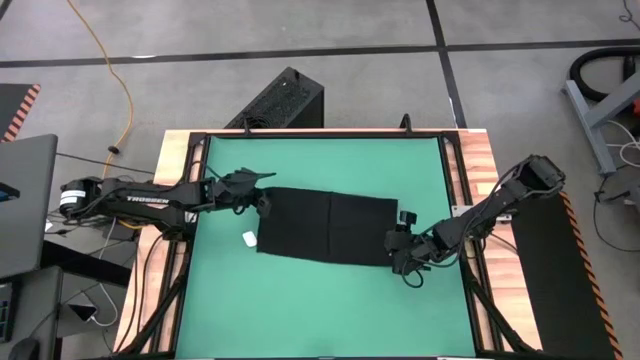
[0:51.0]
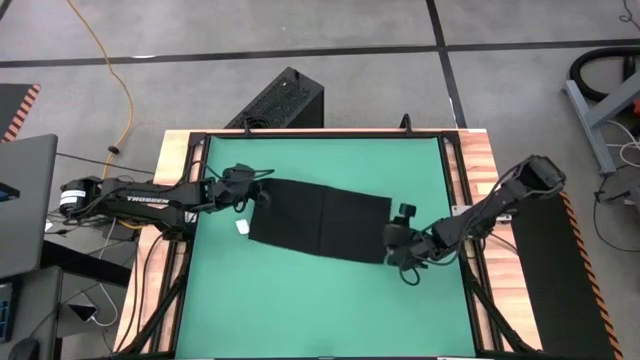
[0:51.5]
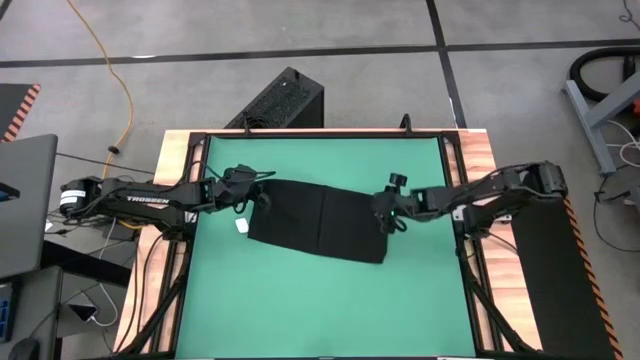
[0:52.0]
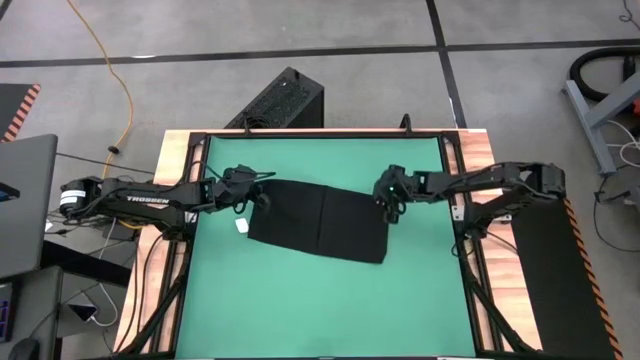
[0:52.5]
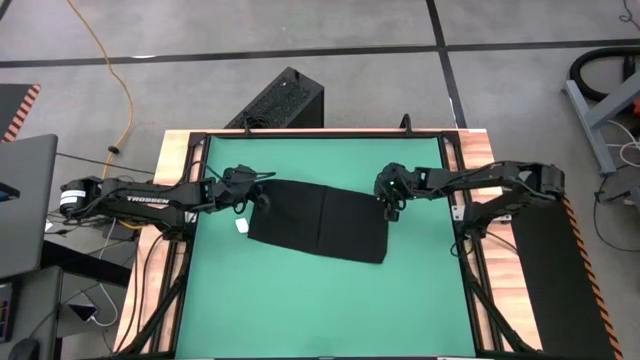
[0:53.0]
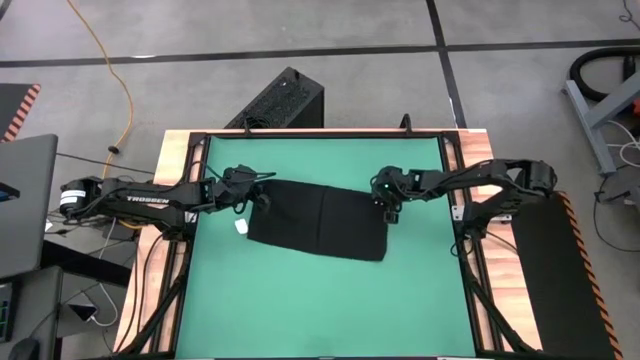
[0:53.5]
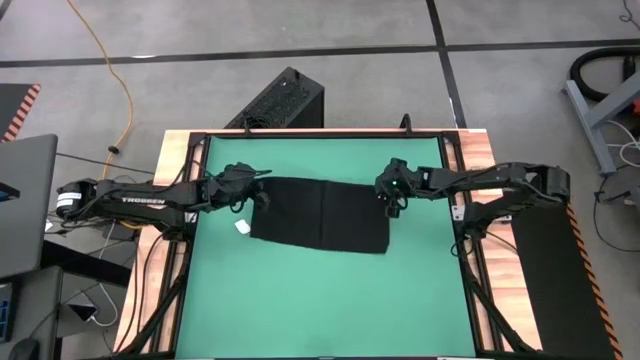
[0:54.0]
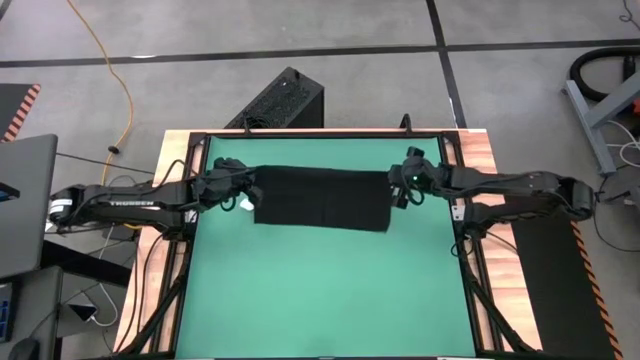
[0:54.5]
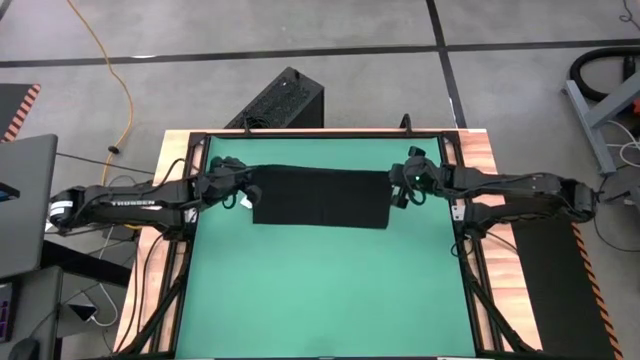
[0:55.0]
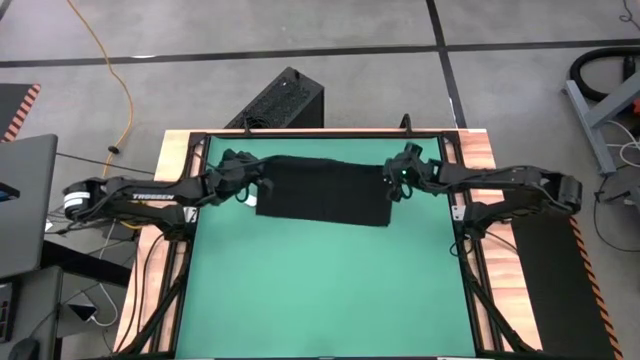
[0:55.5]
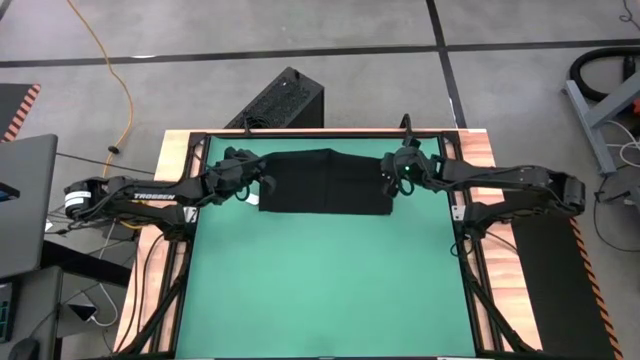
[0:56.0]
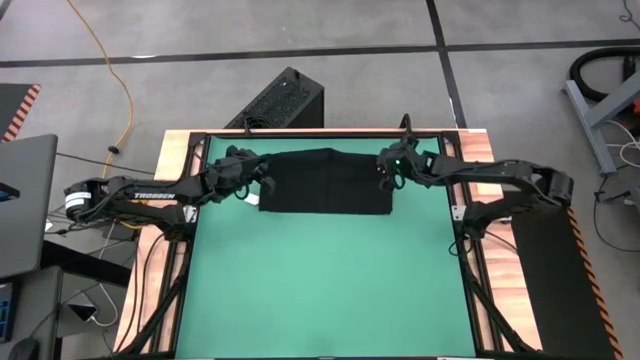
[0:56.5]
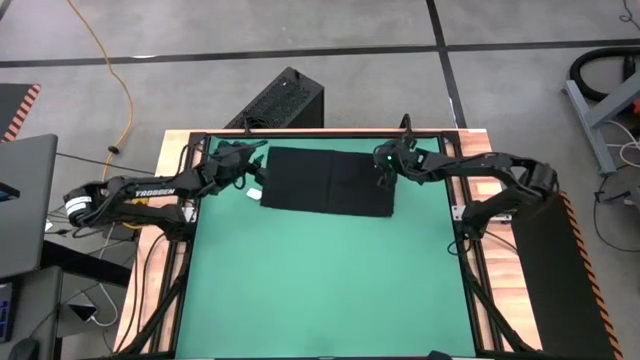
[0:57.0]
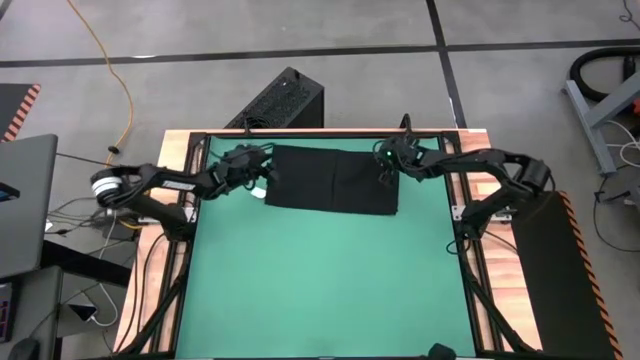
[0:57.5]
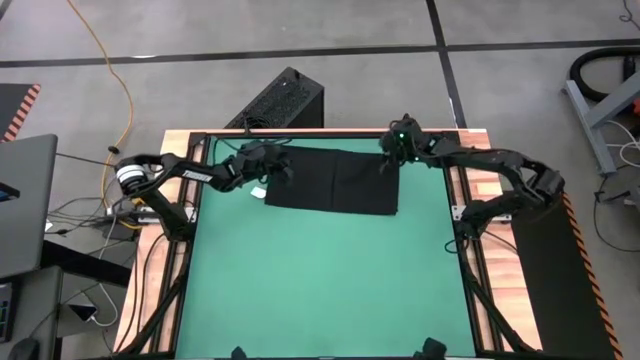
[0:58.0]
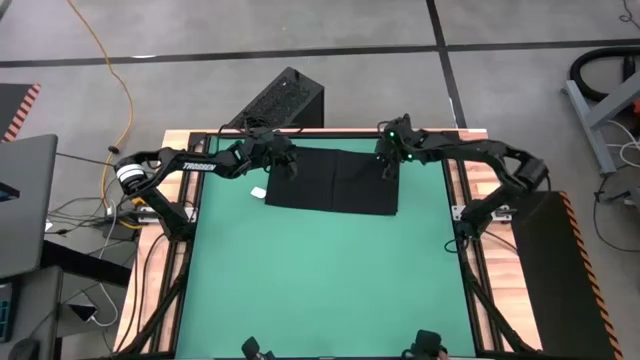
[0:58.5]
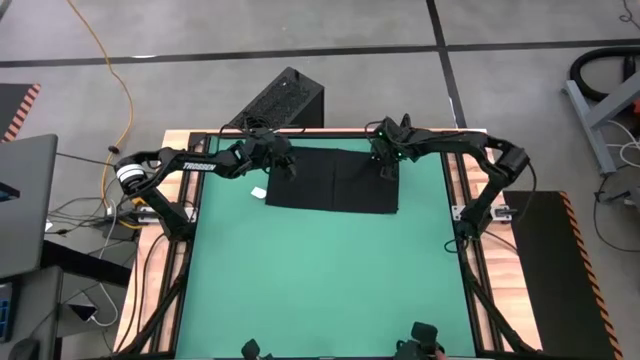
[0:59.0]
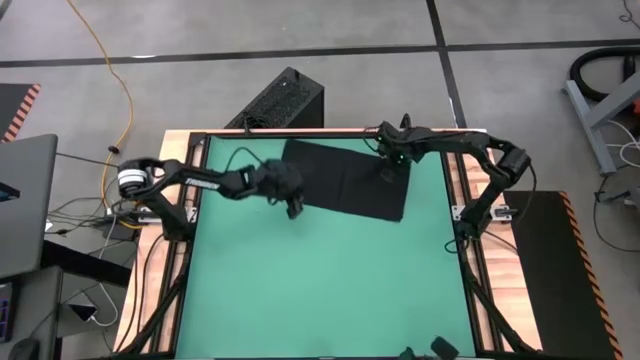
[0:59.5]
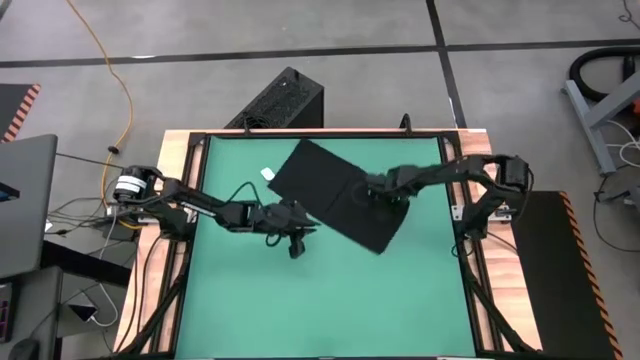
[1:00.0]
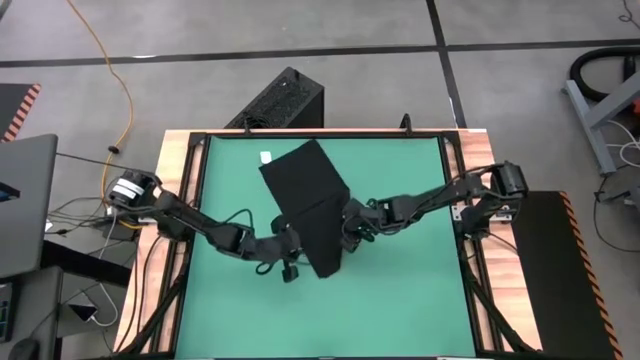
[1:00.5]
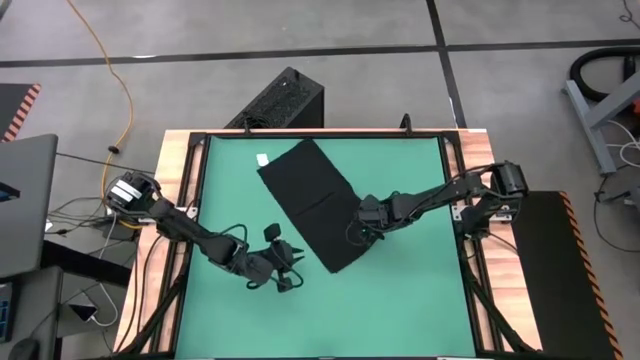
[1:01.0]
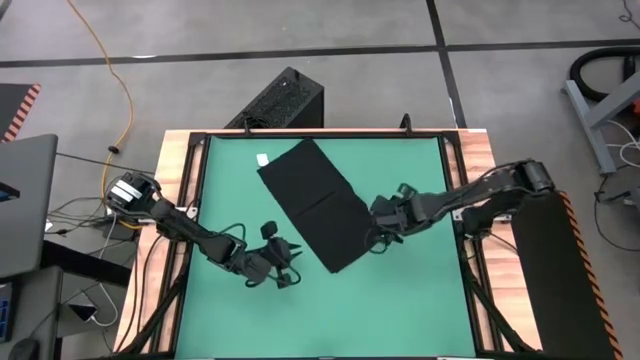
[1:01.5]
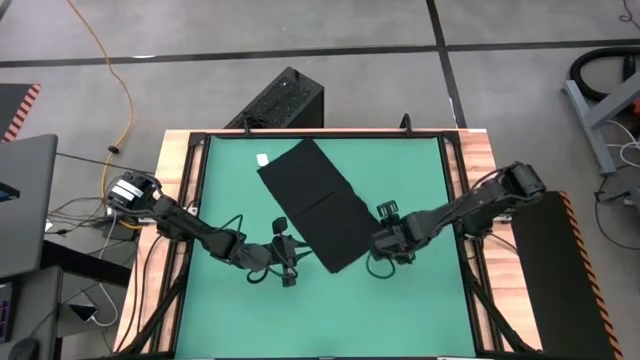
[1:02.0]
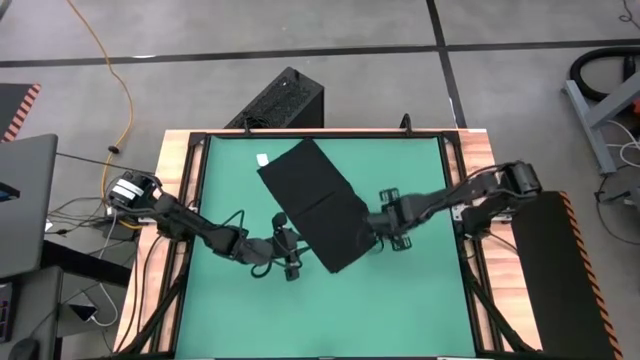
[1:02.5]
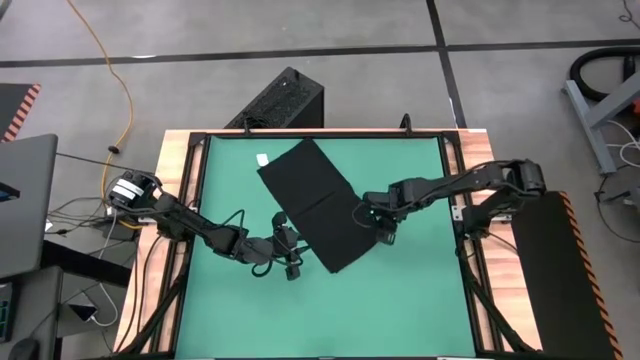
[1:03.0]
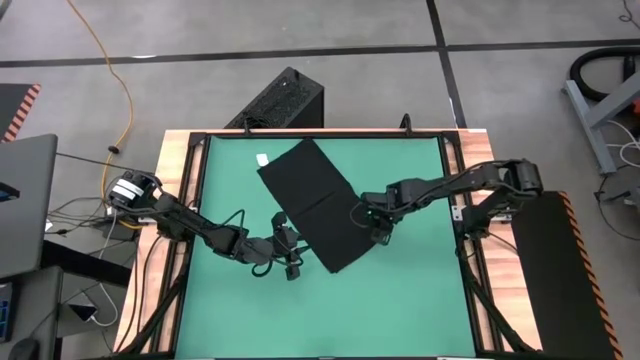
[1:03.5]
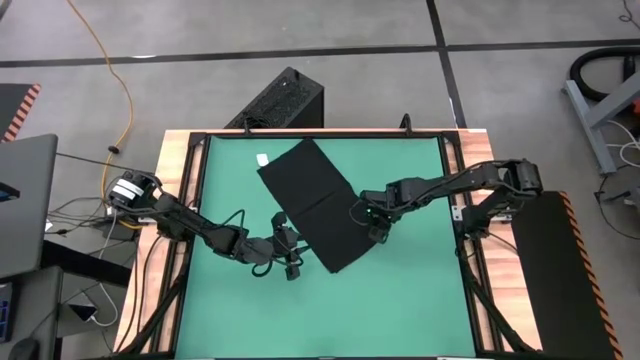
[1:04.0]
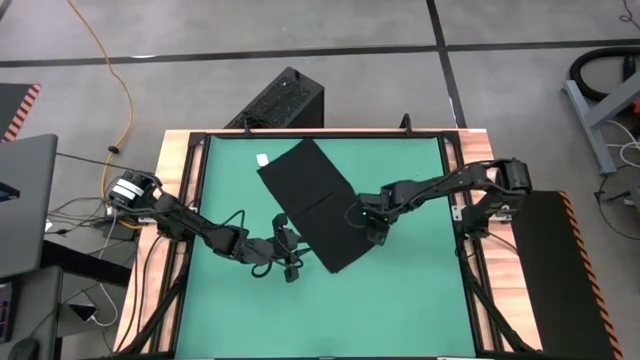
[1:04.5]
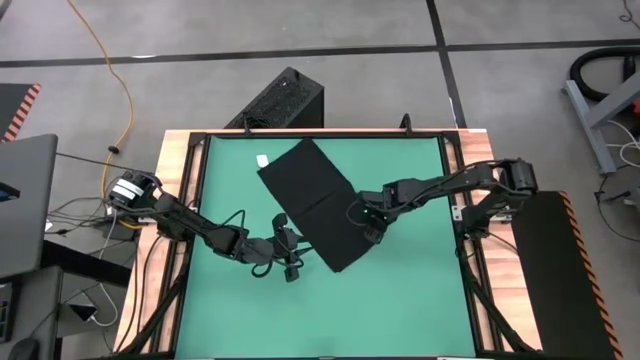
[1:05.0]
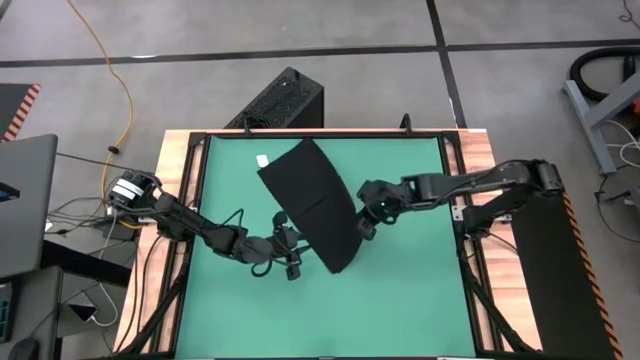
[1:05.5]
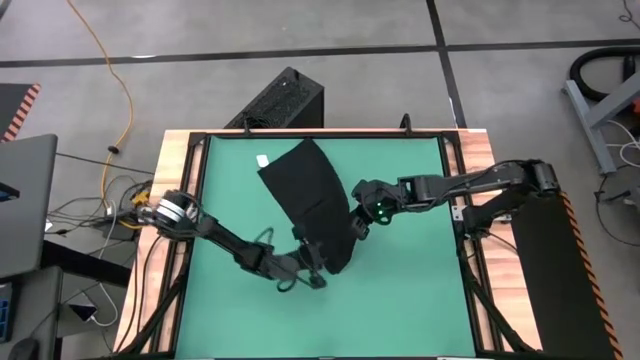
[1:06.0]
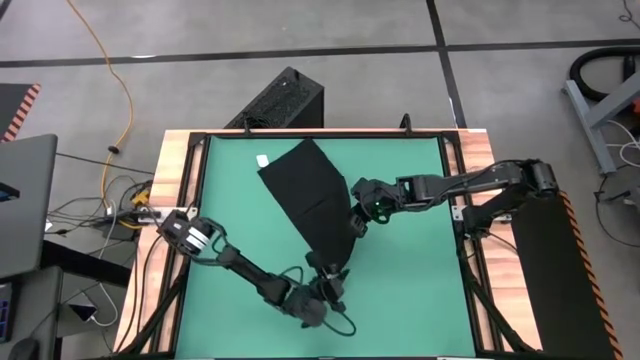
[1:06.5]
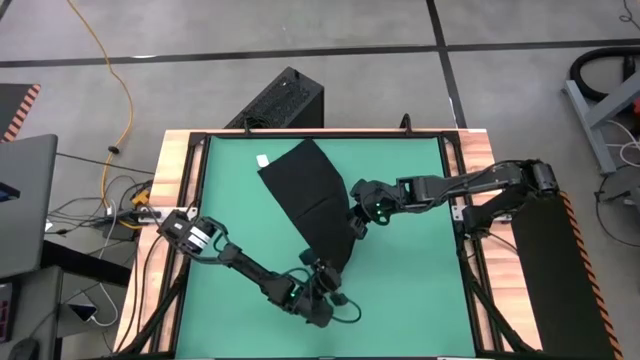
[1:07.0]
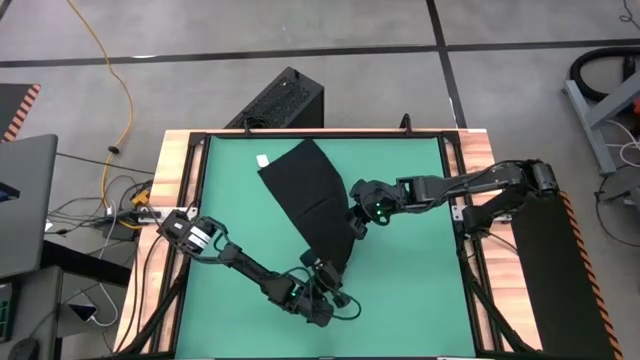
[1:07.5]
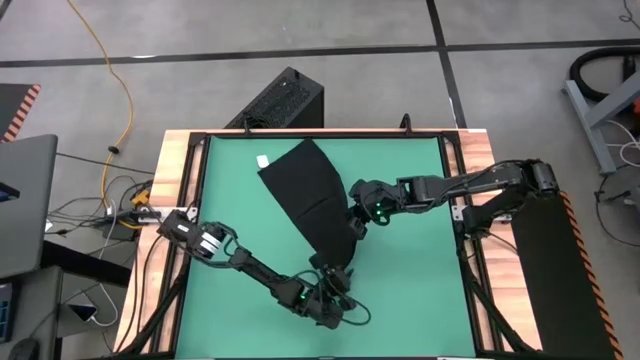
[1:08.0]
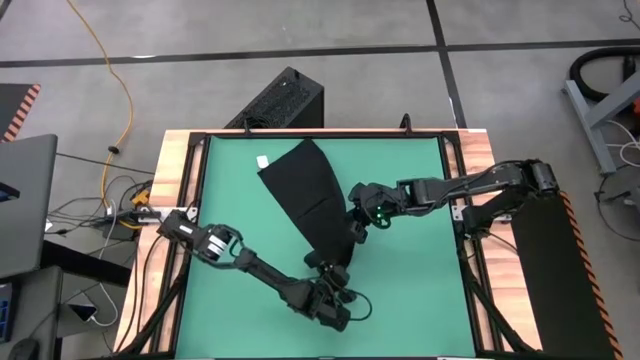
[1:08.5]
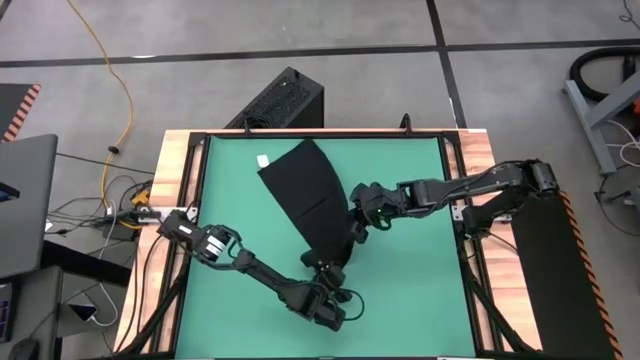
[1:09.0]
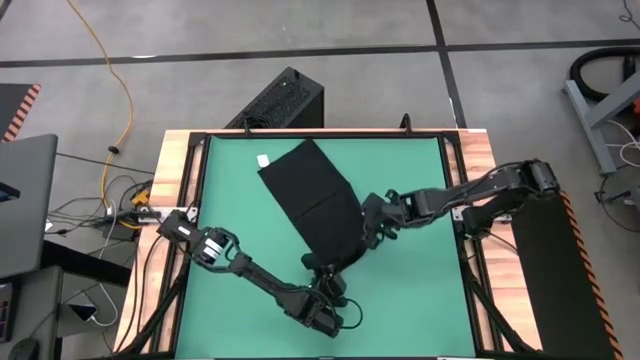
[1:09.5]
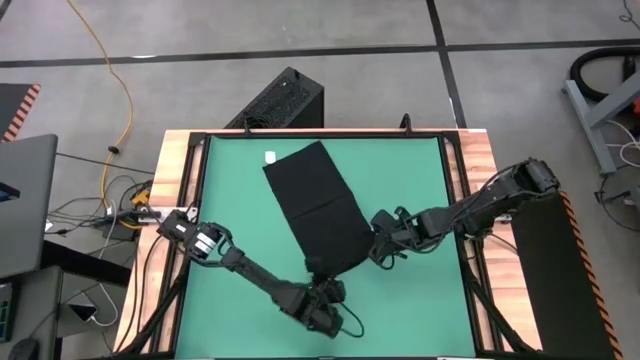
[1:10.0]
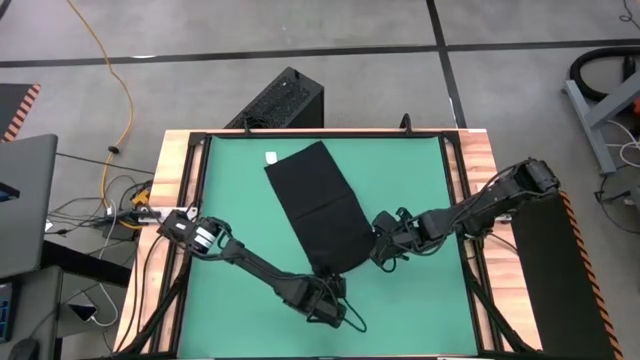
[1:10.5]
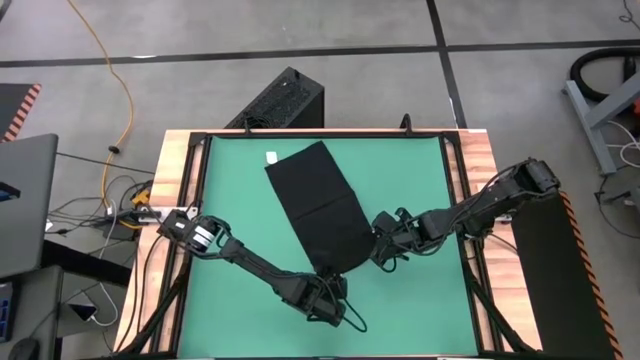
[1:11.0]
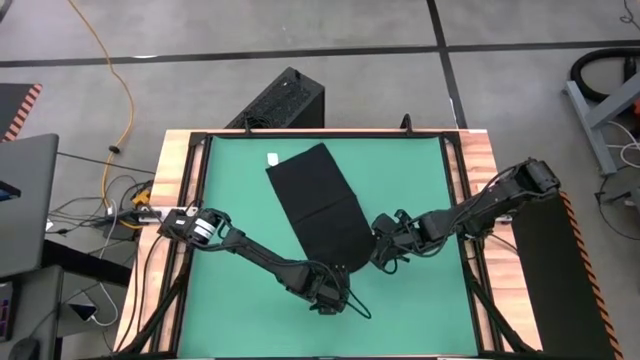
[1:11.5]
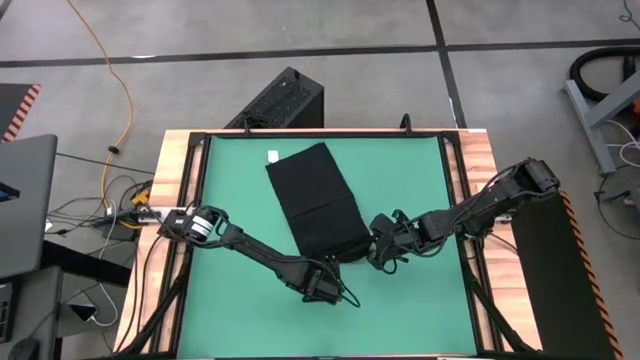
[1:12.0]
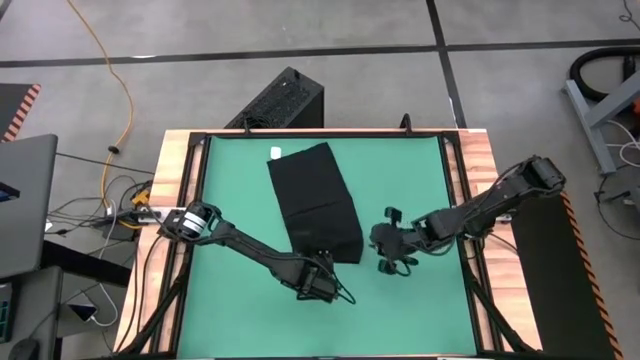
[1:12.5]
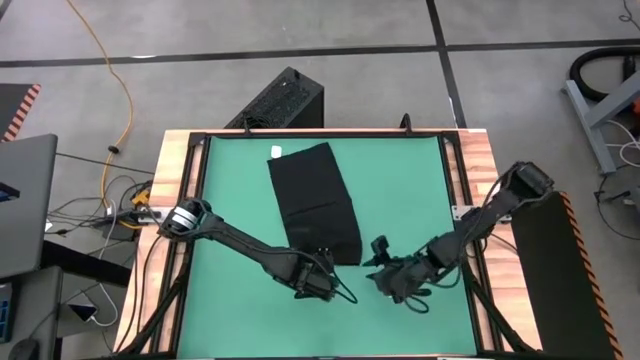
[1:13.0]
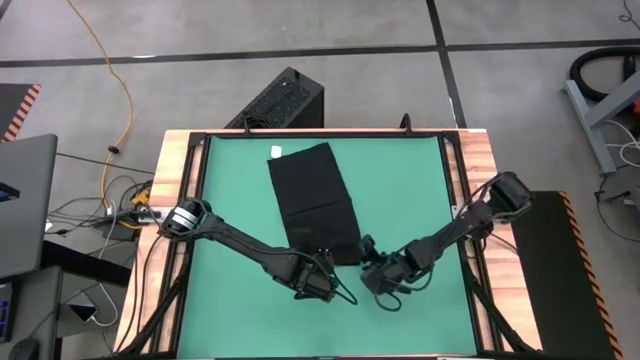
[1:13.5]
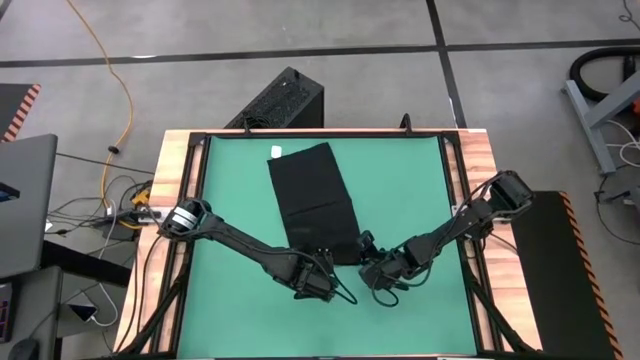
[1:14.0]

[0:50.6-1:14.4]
Task: Roll towel into tight, uniform cylinder
Roll the black towel
